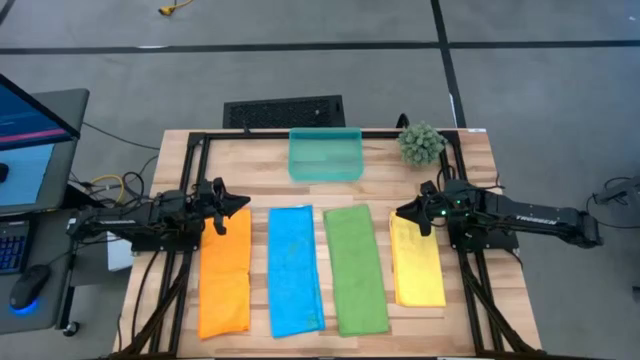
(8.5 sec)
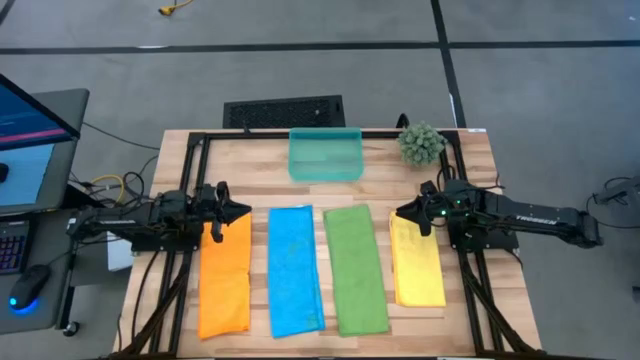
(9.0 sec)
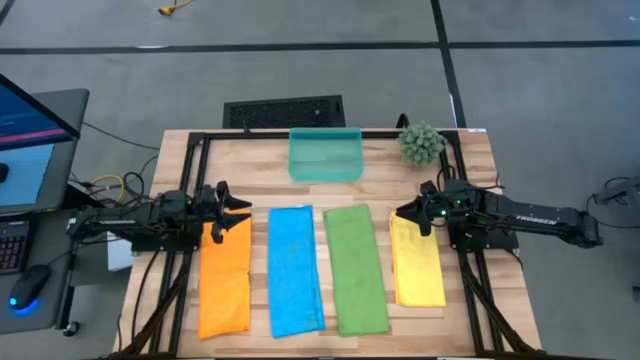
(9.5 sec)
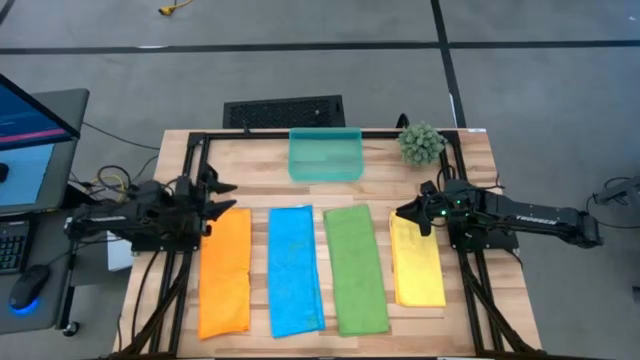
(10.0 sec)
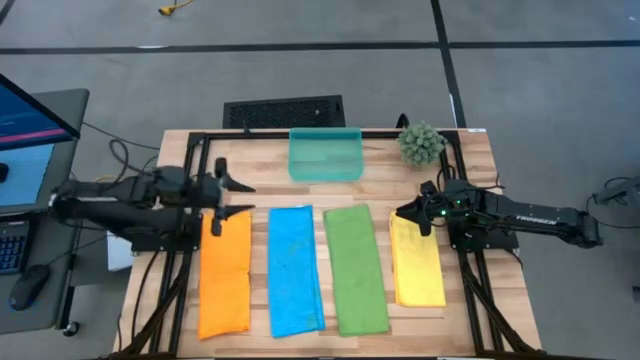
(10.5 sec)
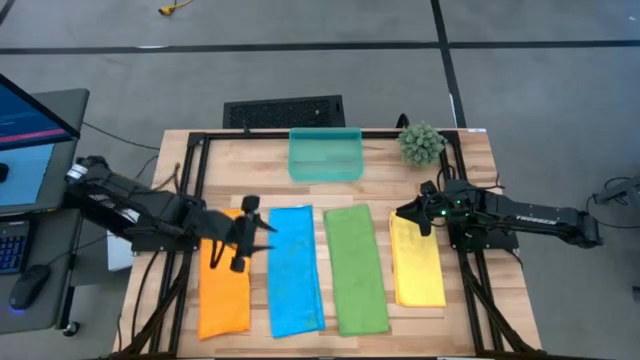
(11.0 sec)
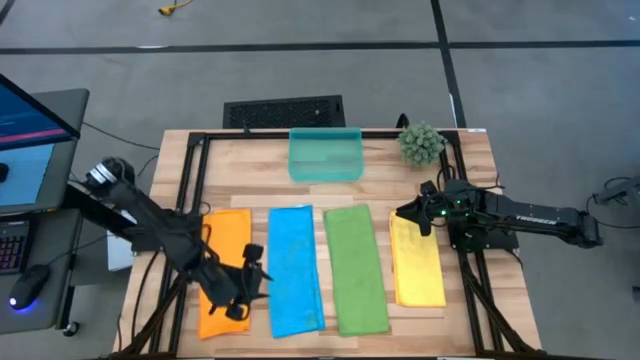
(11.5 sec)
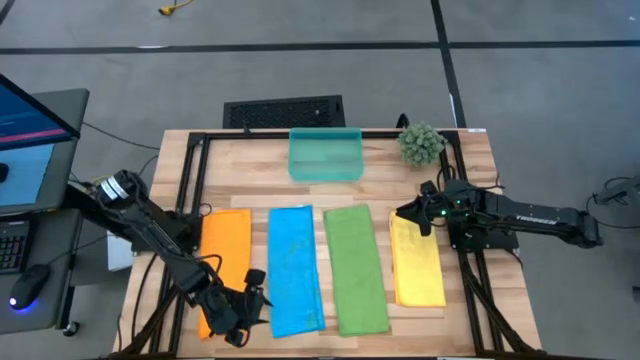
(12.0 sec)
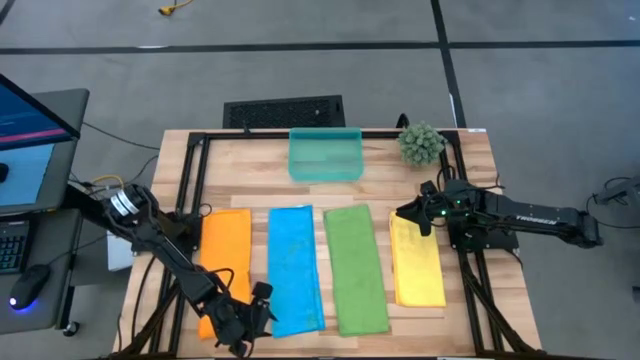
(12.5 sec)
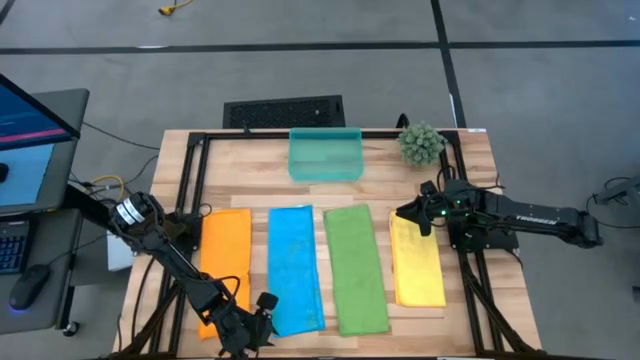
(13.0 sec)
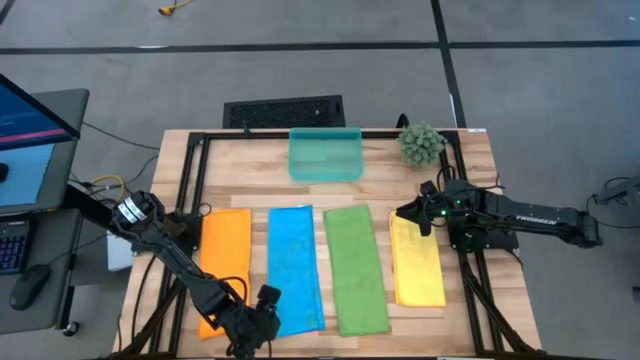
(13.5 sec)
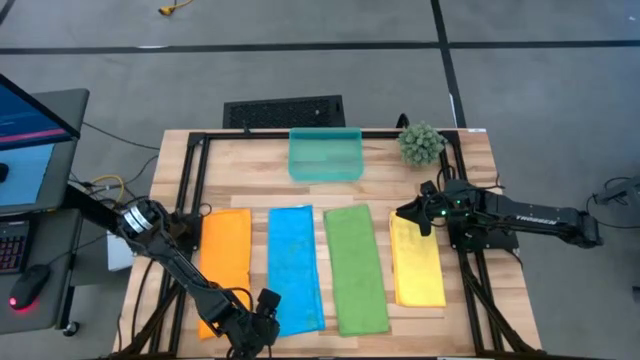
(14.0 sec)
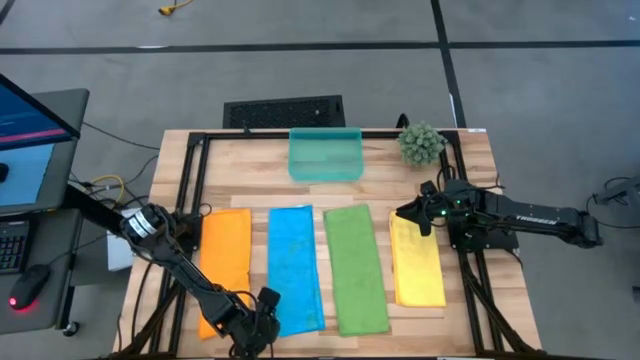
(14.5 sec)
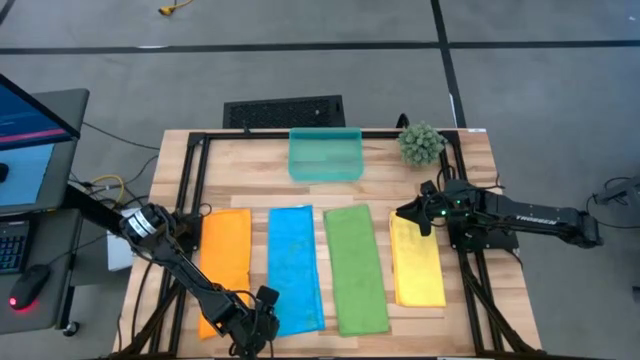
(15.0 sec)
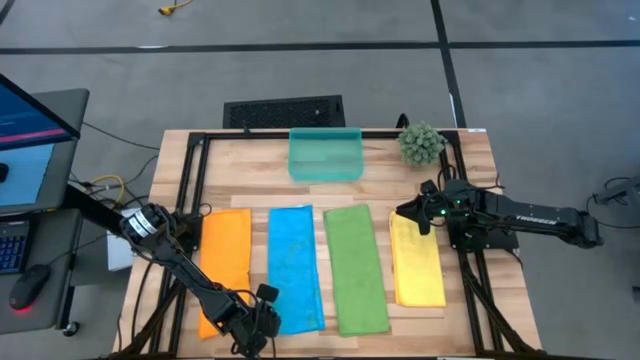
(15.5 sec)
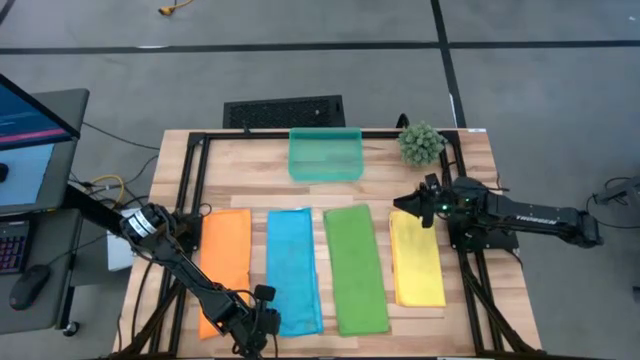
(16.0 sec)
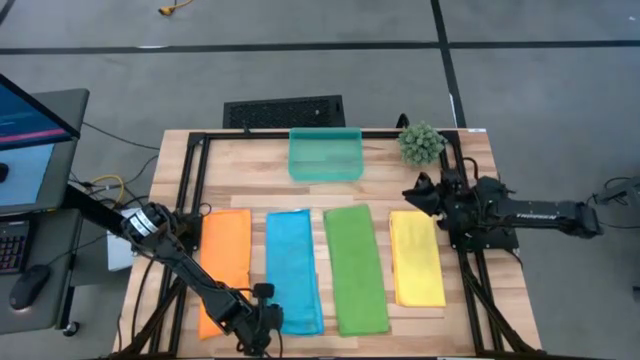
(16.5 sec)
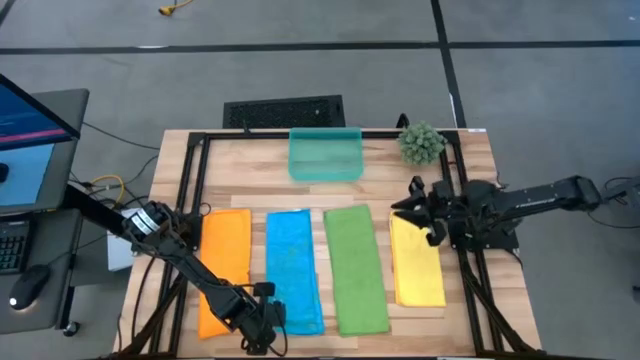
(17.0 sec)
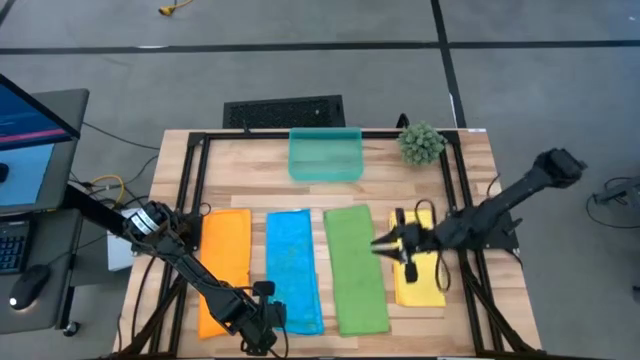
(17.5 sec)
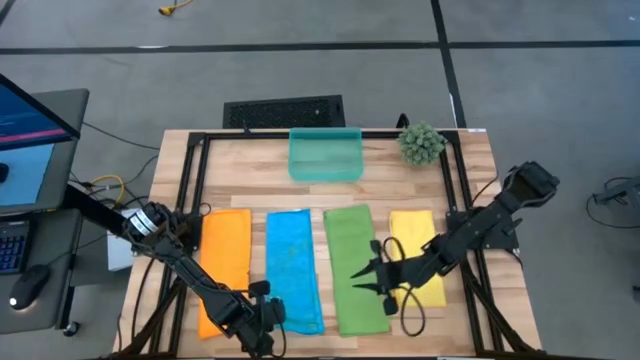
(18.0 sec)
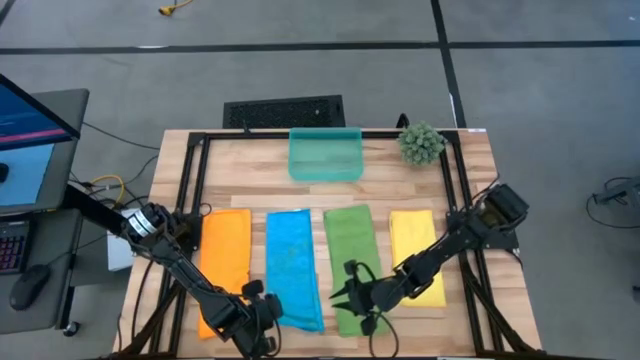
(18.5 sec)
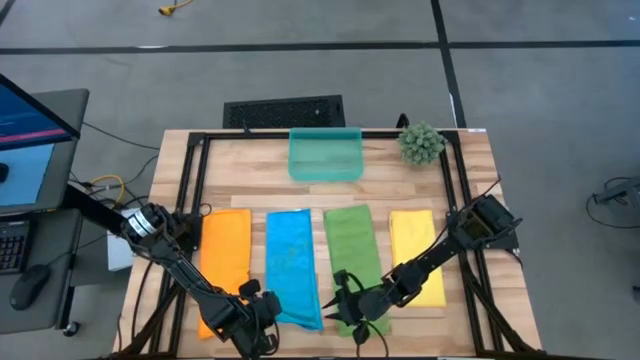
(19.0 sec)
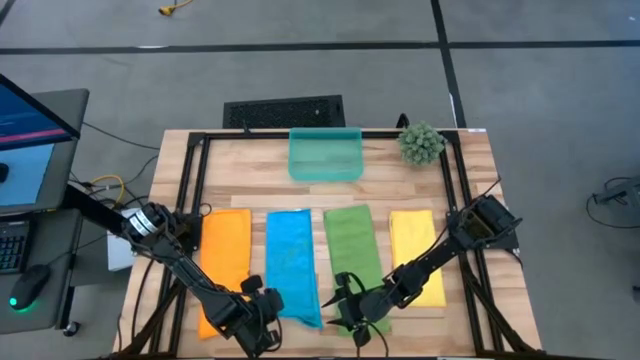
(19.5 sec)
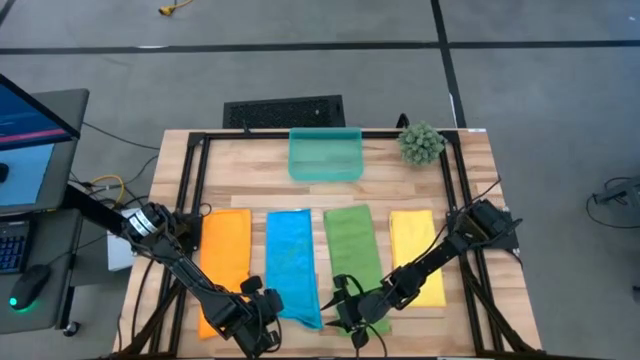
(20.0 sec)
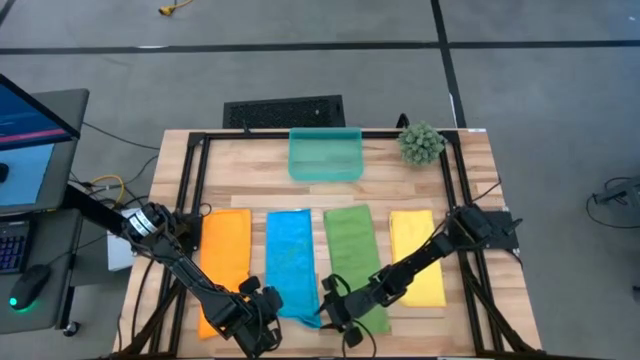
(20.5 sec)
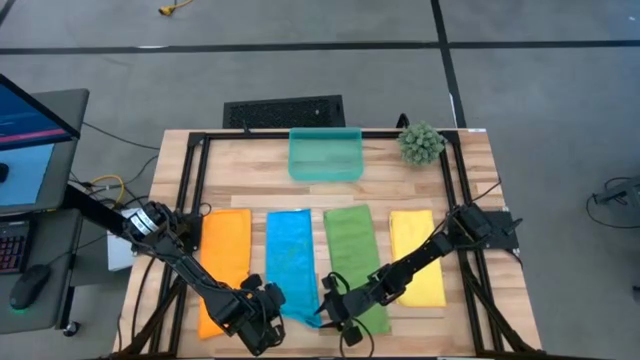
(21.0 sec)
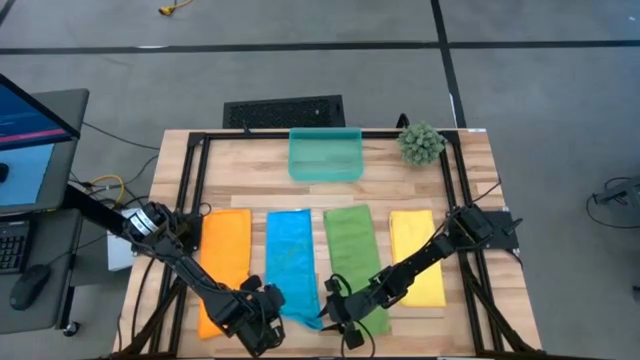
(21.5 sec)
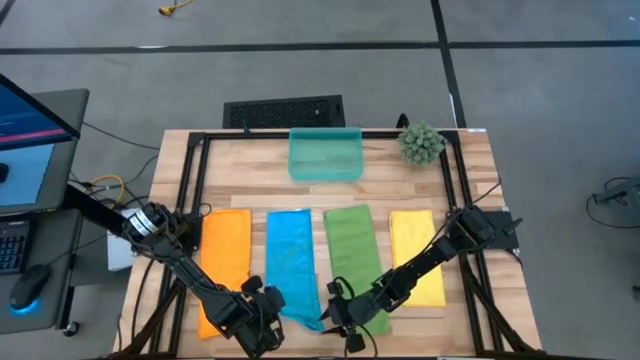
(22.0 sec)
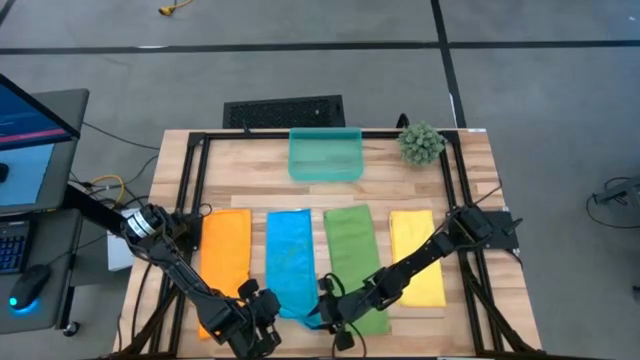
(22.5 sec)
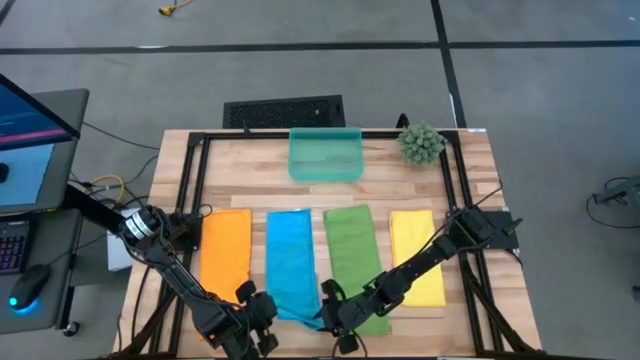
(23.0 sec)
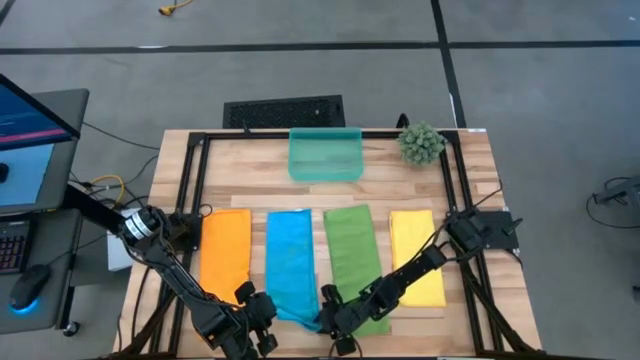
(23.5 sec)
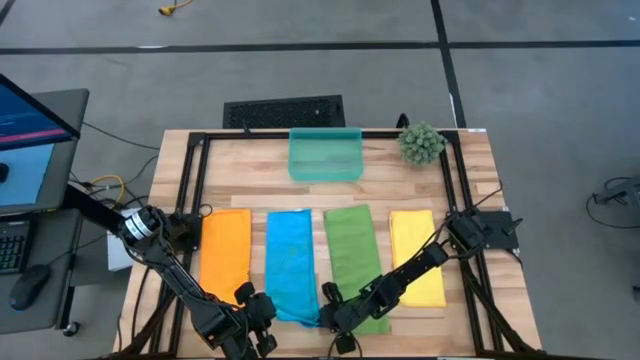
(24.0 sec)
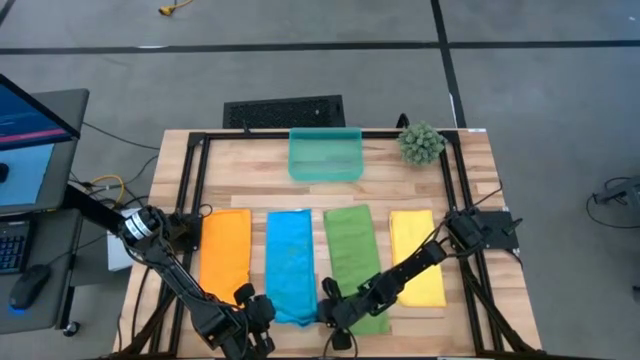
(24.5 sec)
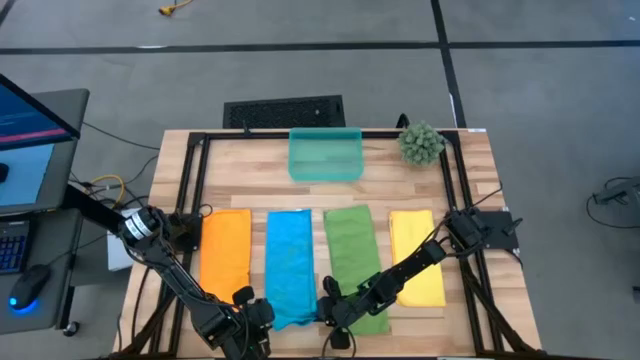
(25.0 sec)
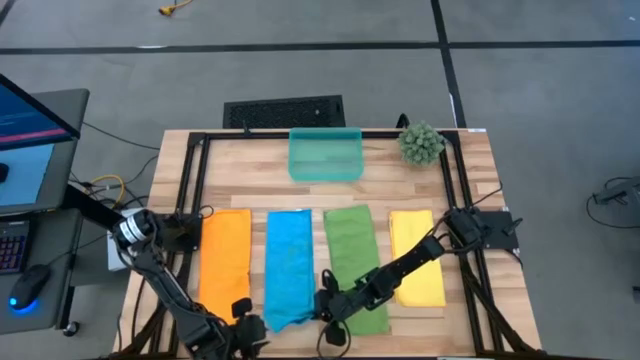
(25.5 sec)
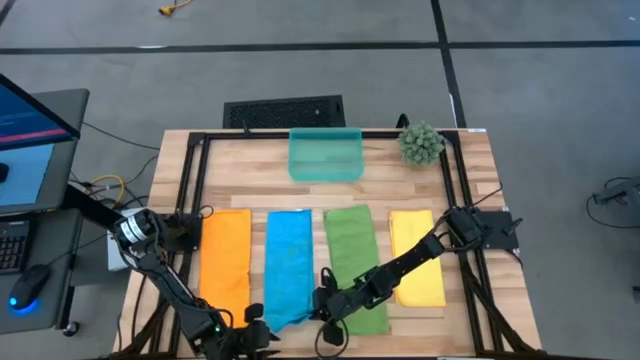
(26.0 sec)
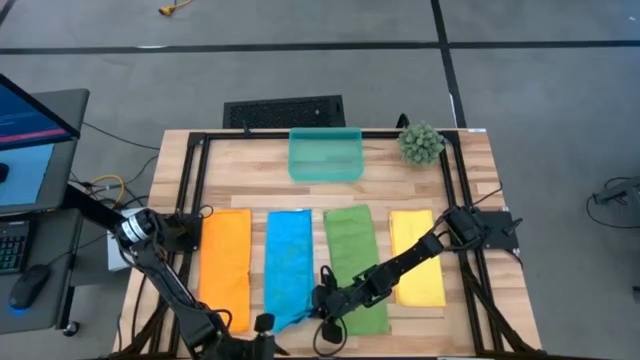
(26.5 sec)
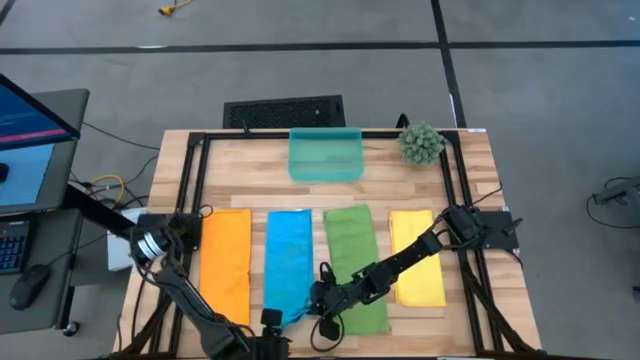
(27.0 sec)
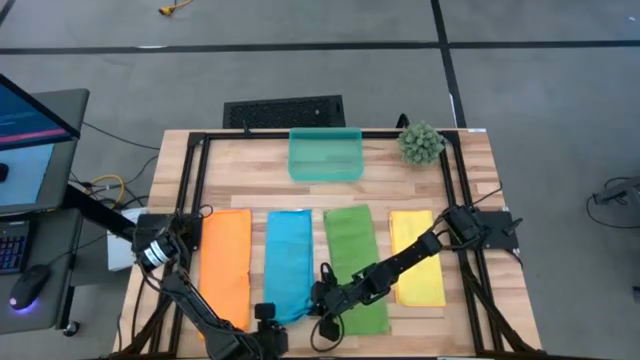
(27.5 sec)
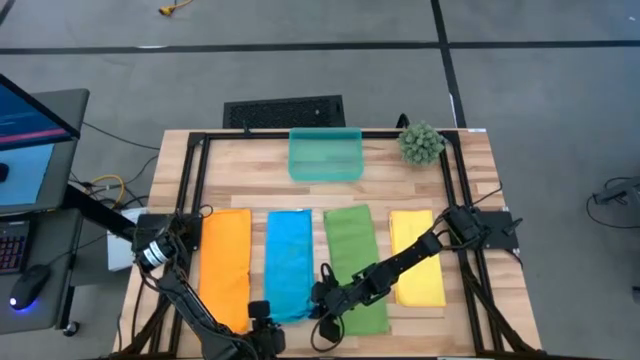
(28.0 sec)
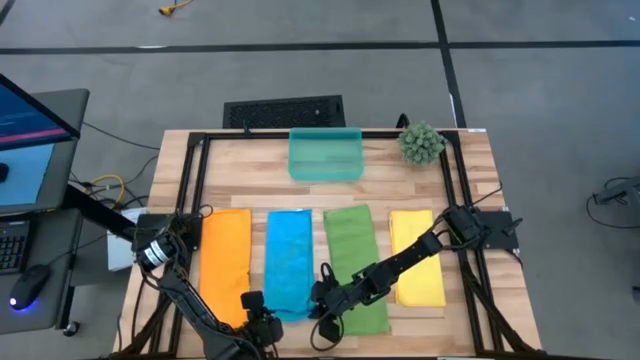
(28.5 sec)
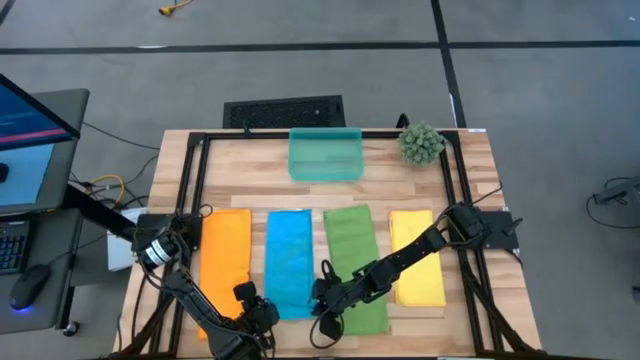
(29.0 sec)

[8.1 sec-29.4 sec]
Task: Roll microfiber towels into tight, uniform cylinder then place into a basket
Roll the blue towel
